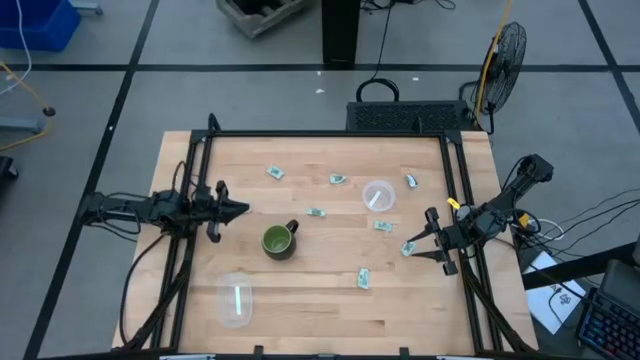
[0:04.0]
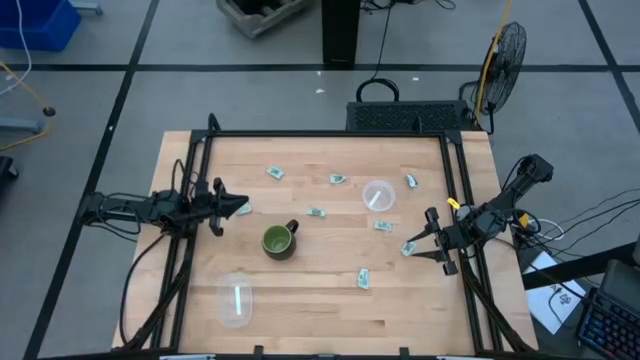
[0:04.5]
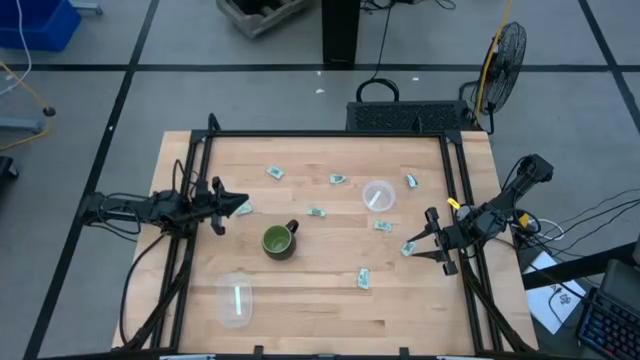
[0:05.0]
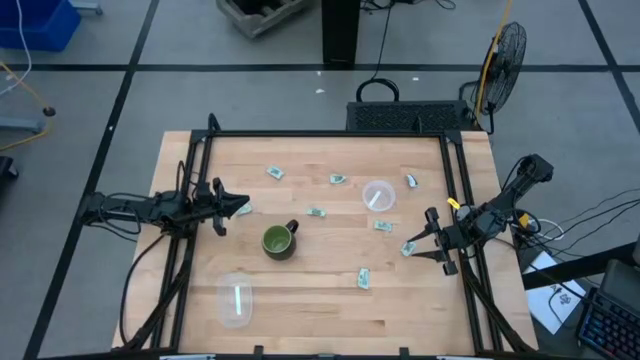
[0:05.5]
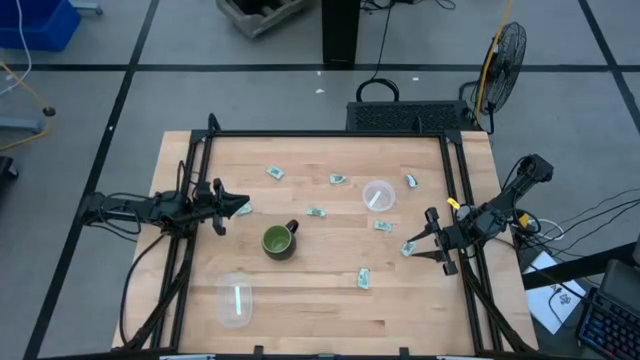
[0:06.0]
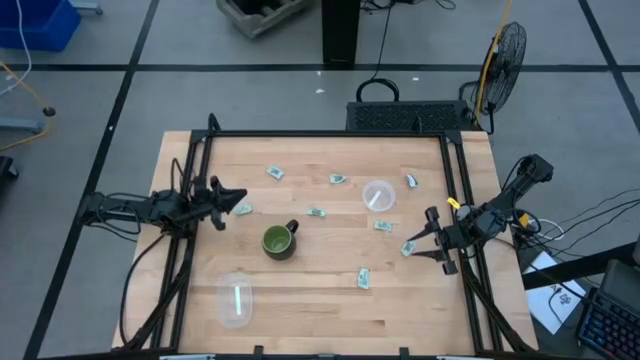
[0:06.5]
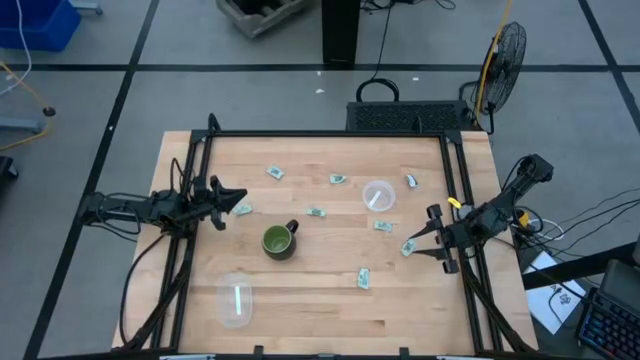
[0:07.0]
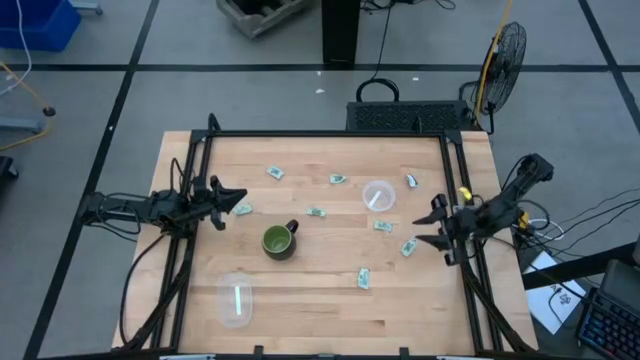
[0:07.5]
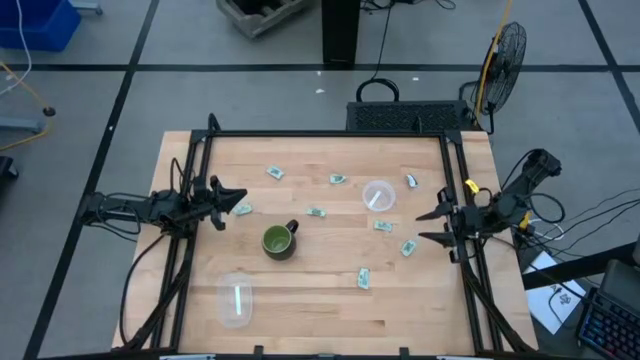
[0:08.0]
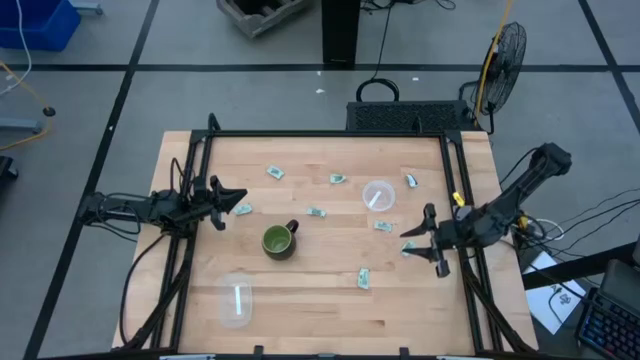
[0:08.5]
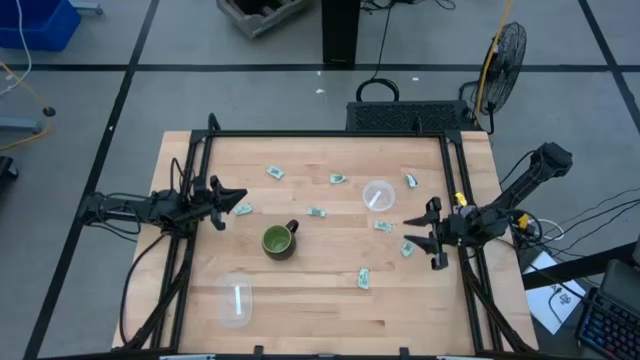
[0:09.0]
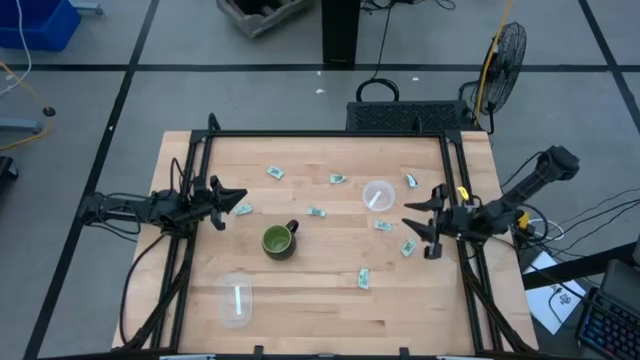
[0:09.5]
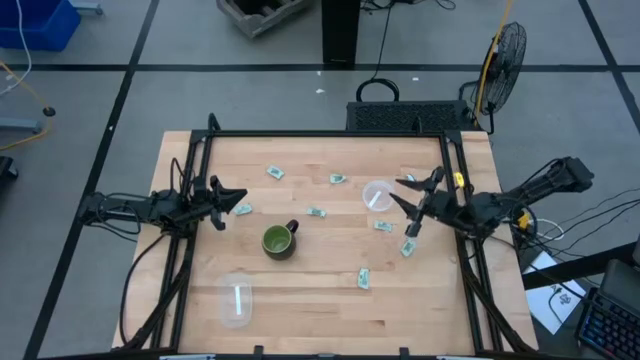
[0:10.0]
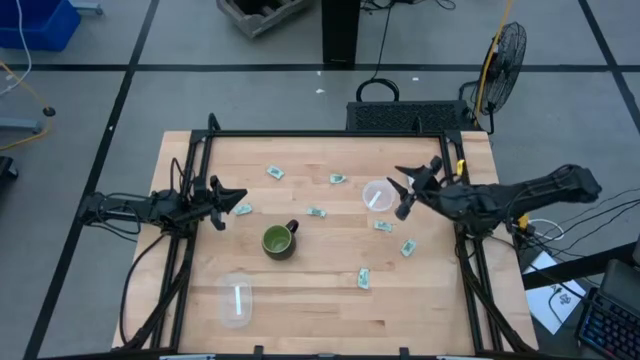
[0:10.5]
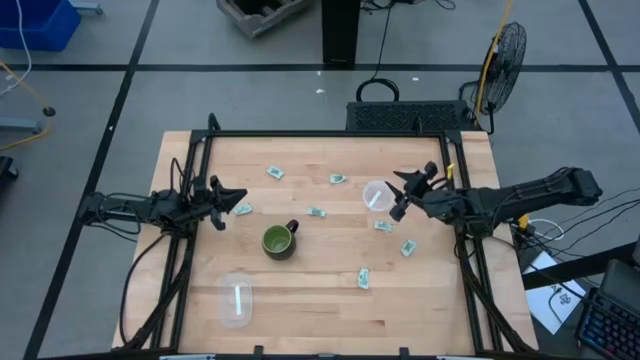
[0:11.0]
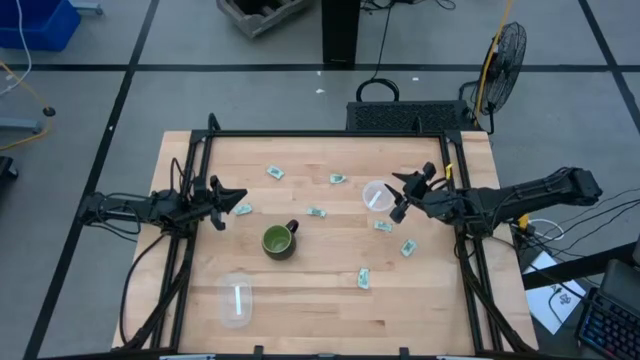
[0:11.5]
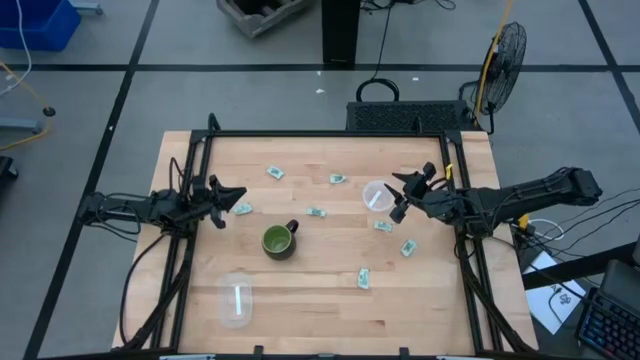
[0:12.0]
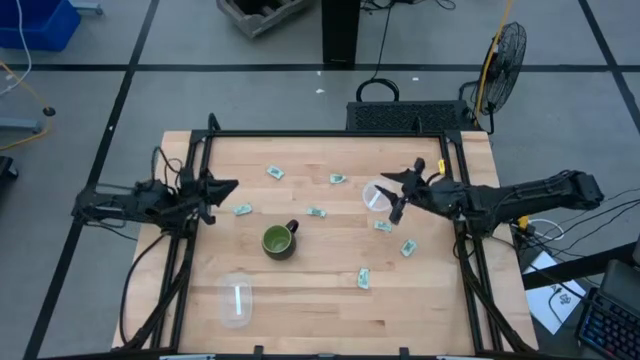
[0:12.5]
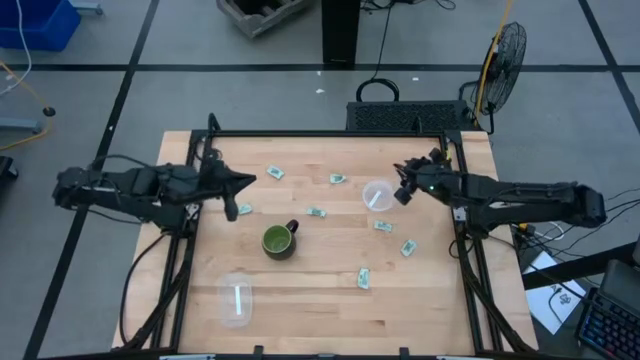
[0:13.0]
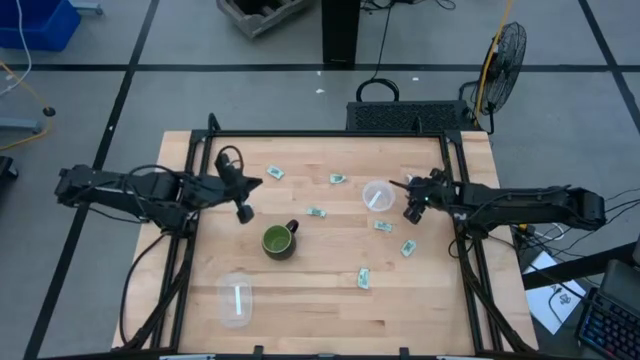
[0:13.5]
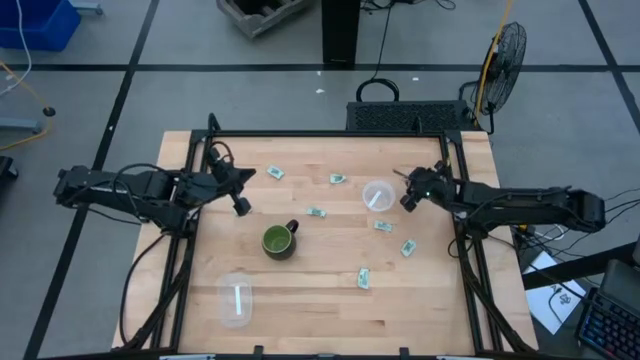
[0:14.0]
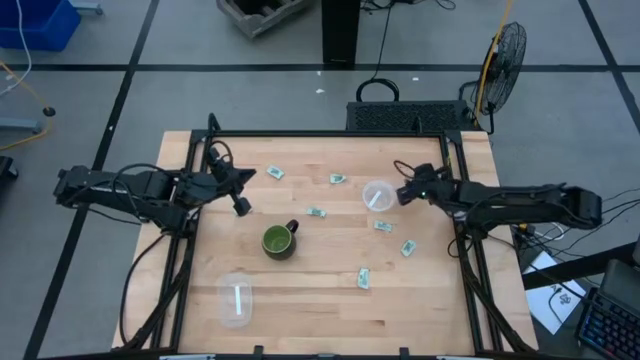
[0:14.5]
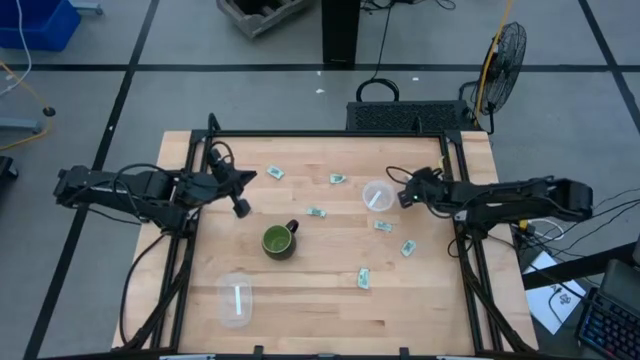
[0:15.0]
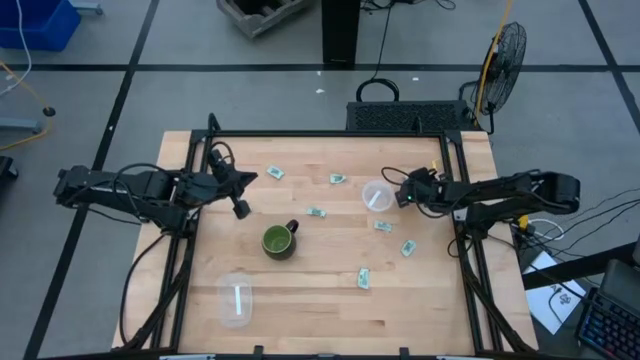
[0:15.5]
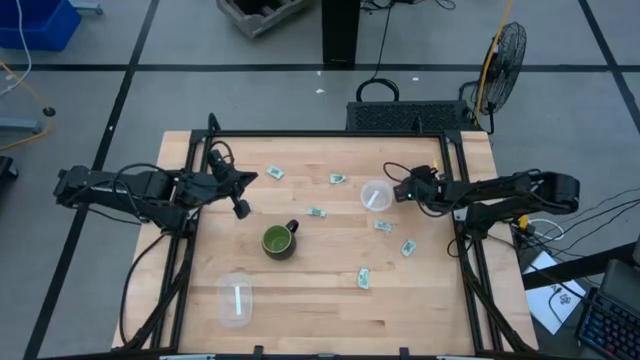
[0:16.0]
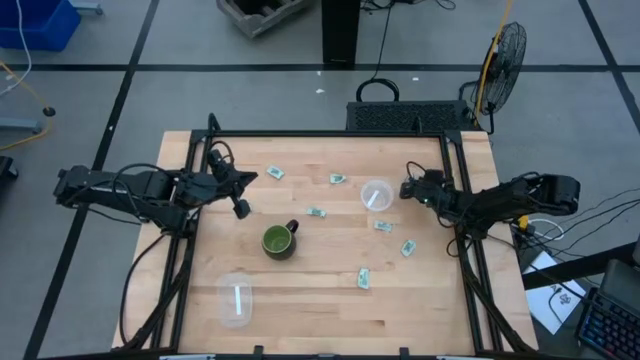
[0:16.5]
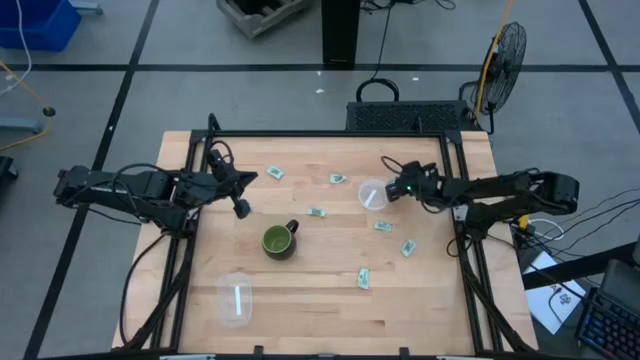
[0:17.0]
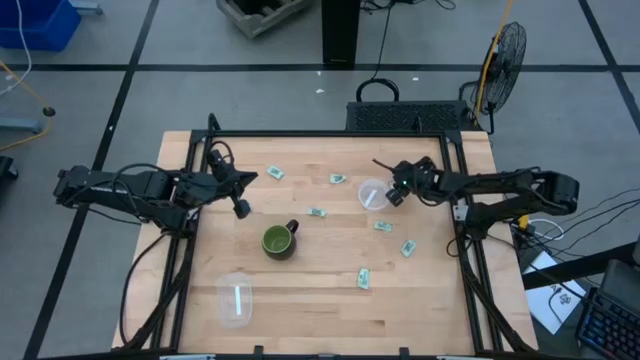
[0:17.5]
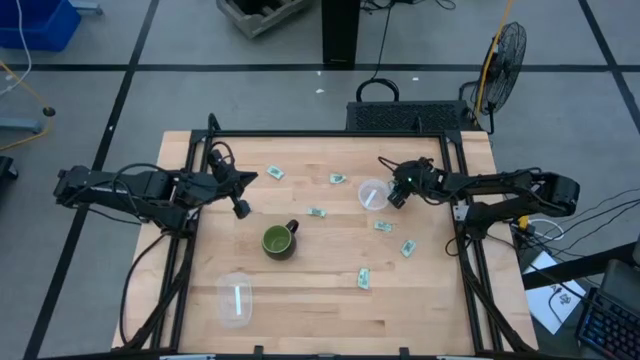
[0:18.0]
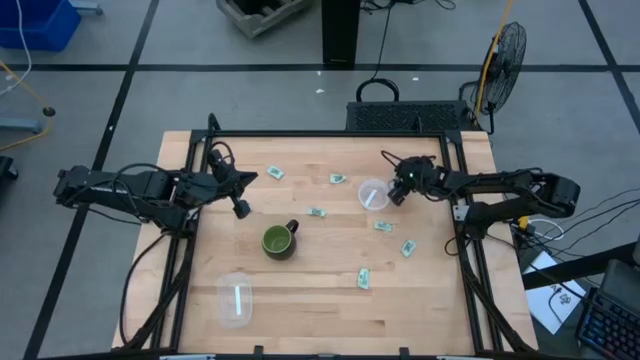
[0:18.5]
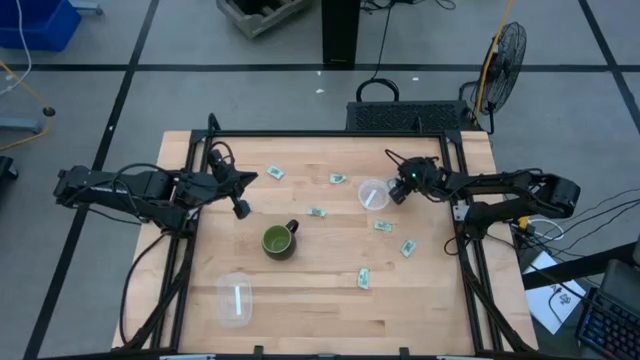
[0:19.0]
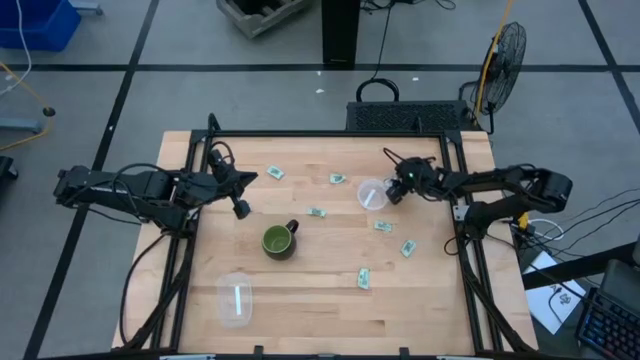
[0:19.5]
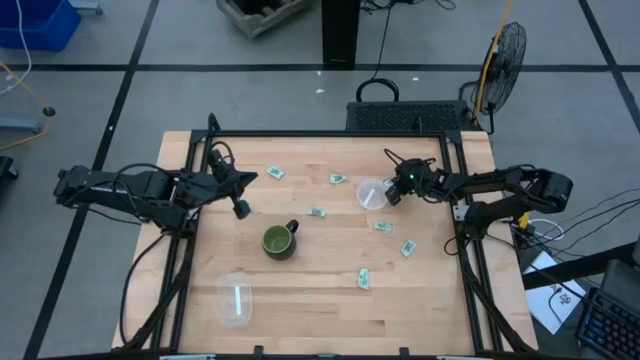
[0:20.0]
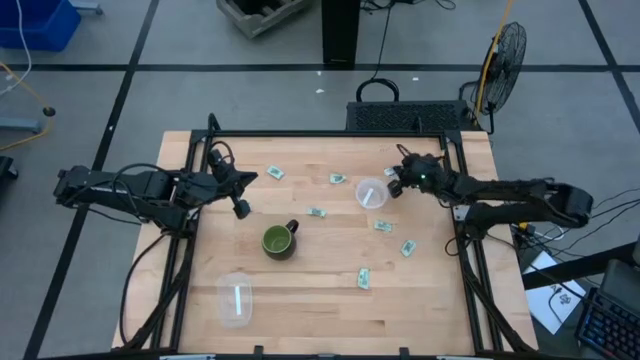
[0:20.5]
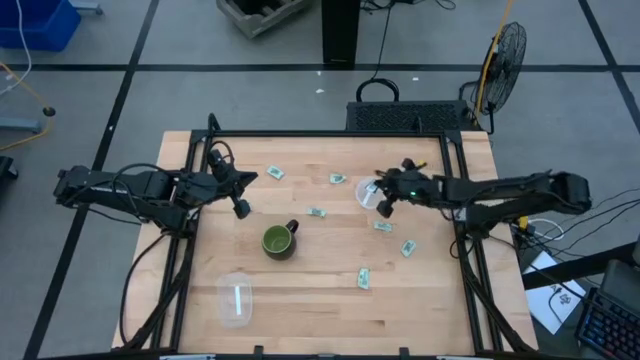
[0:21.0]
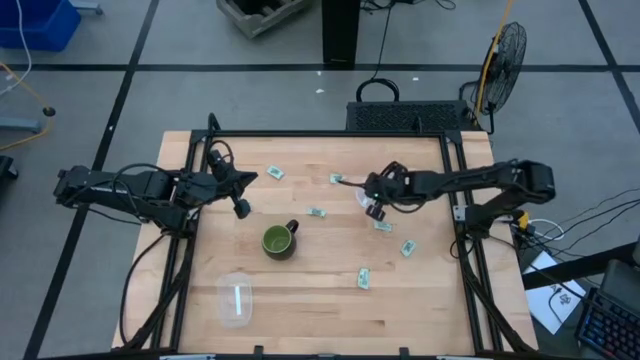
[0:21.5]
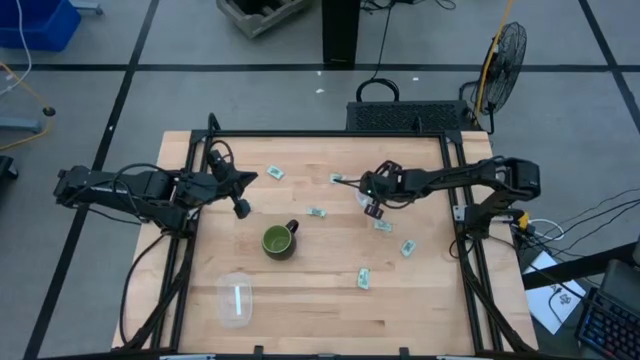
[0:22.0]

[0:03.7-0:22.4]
Task: Pick and place Stevia / Truvia into bins
Put the green truvia packet into the circle transparent container

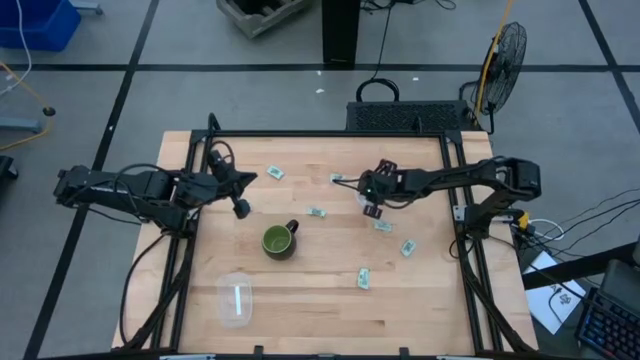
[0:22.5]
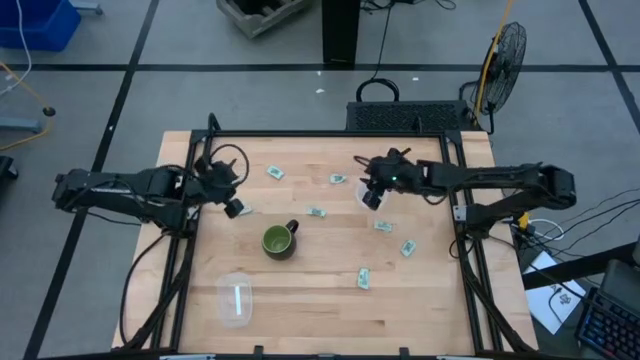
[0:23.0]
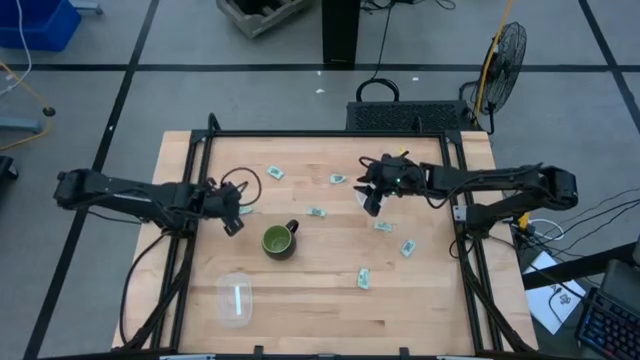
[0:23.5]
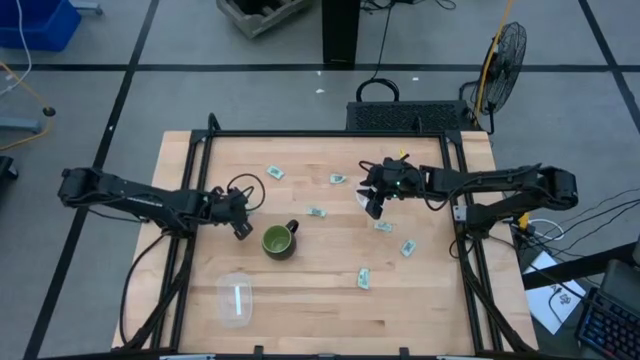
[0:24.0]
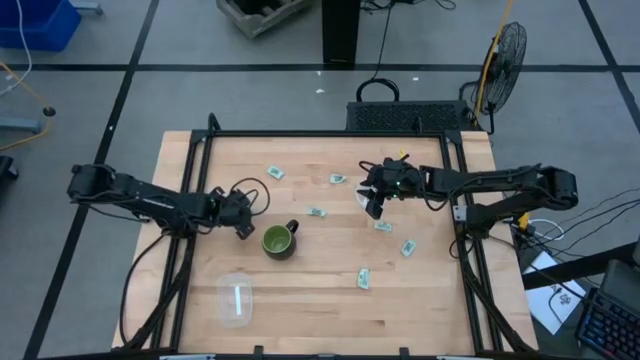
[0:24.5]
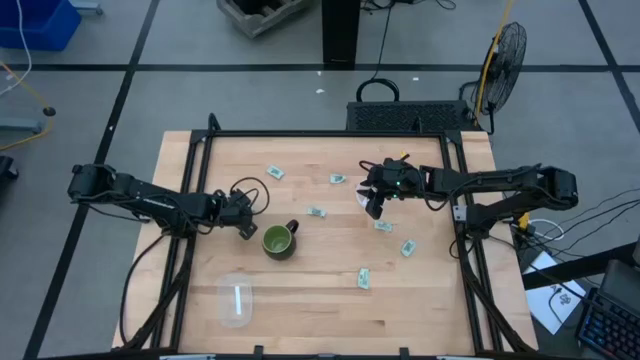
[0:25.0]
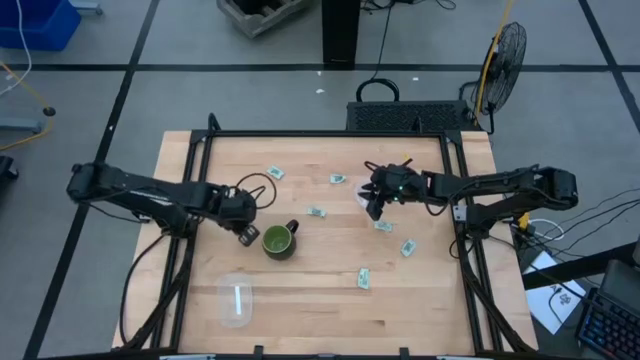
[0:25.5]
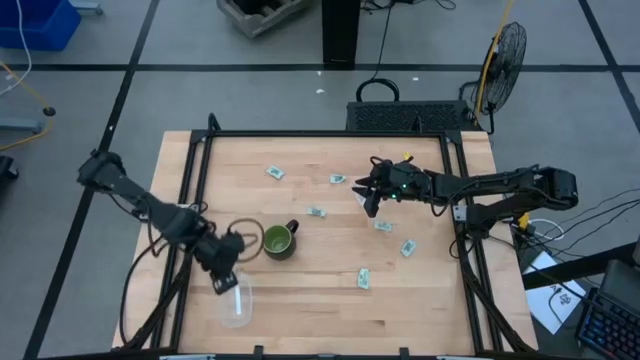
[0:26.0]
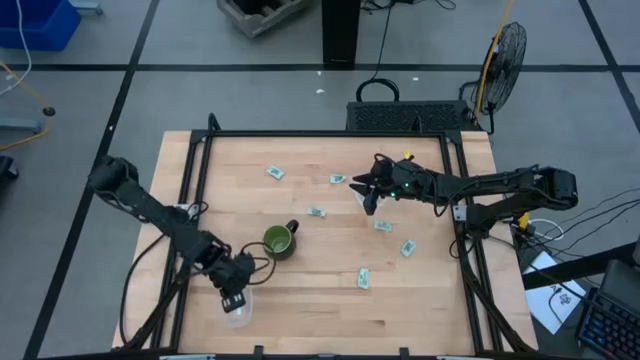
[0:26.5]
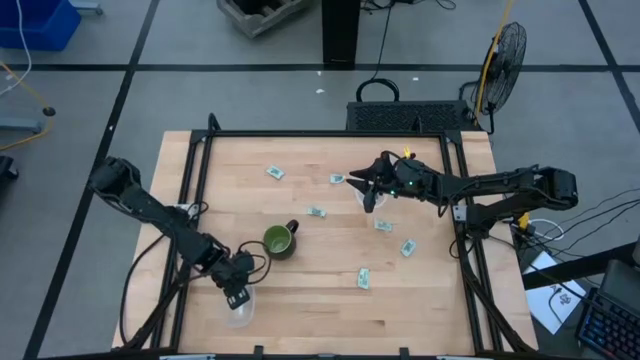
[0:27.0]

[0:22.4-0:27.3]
Put the white stevia packet into the rectangle transparent container
